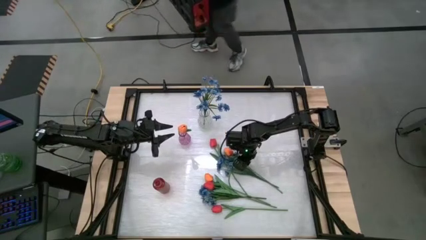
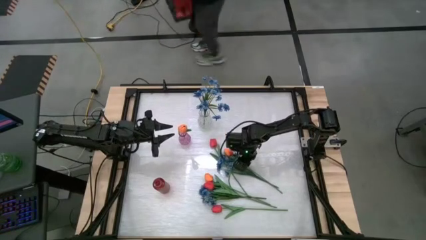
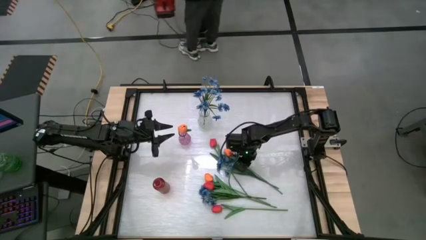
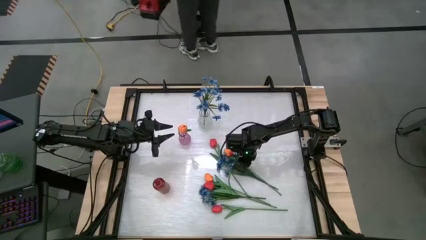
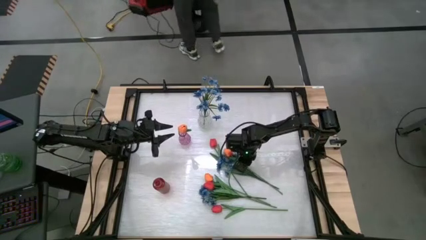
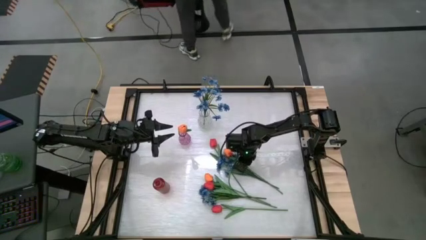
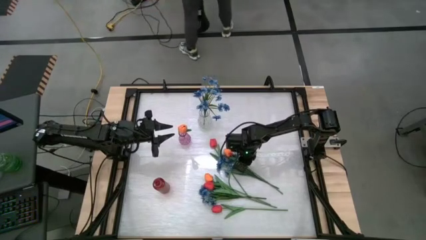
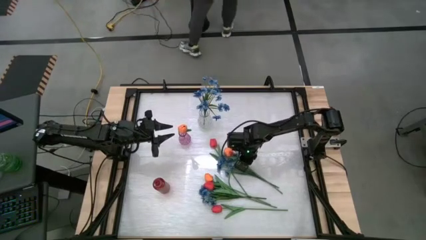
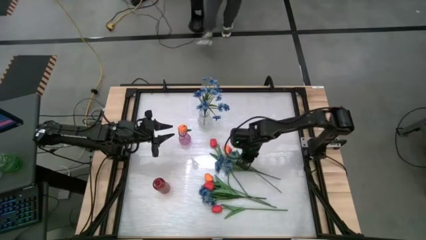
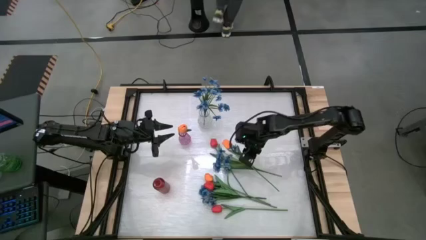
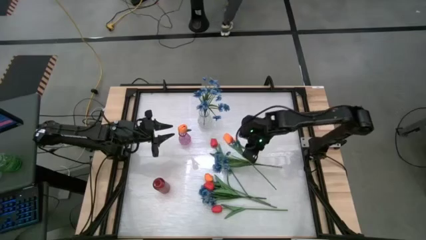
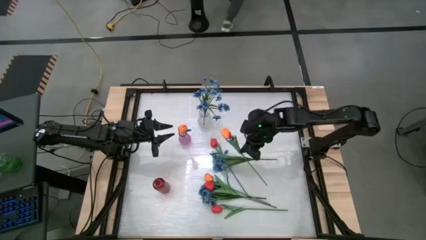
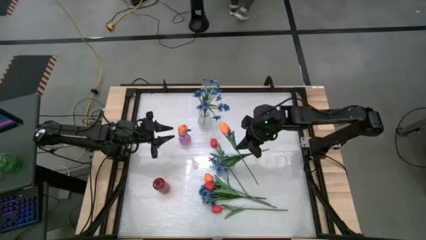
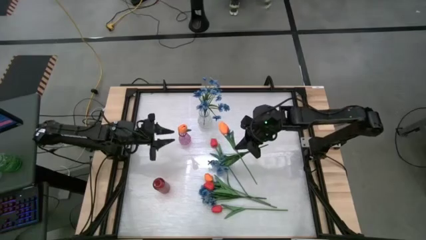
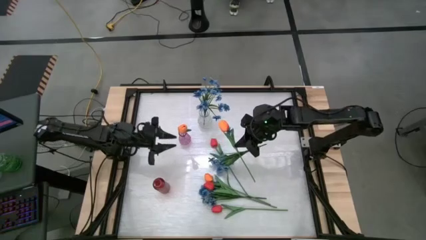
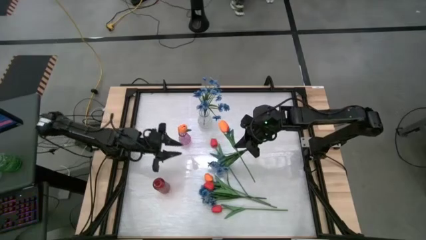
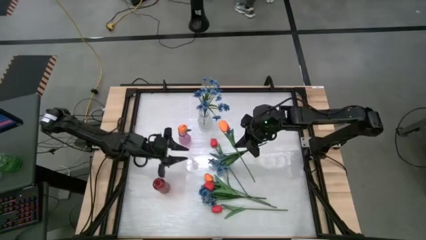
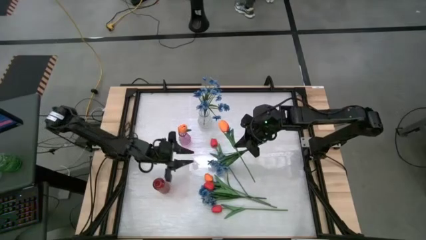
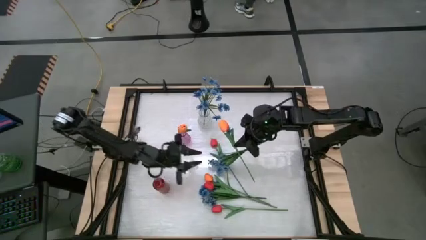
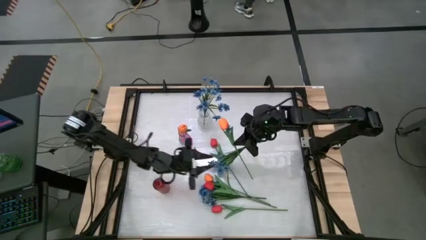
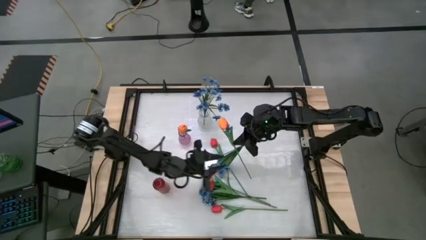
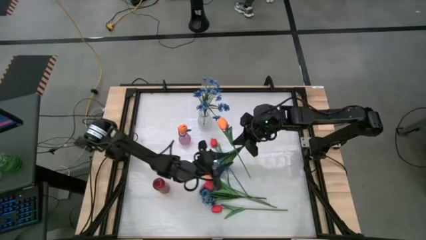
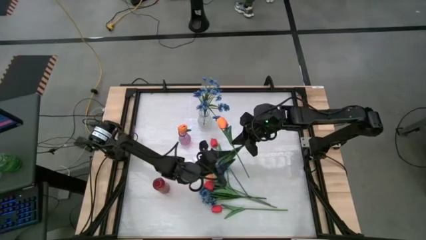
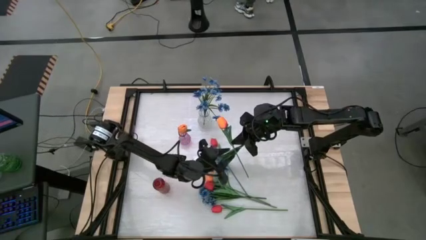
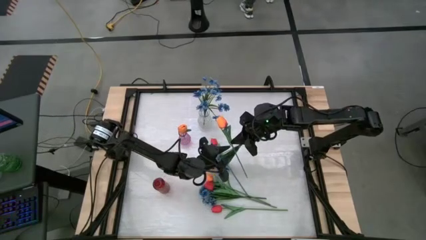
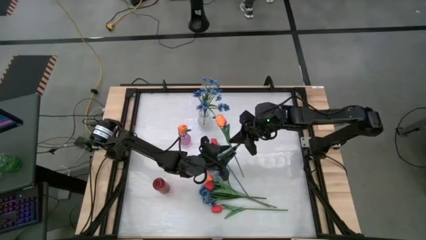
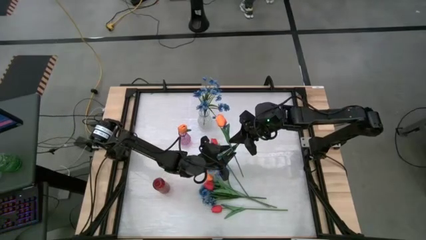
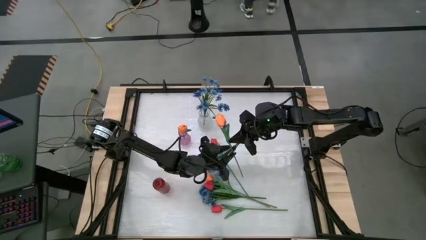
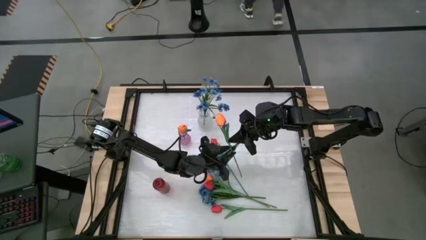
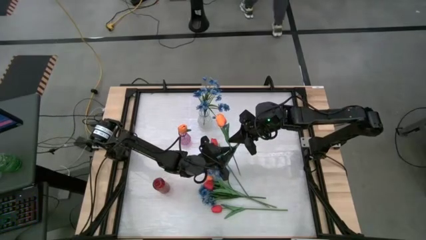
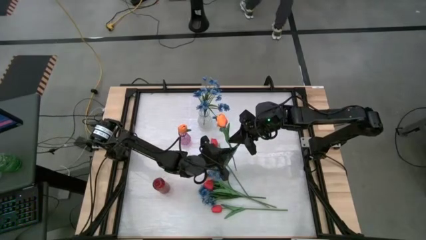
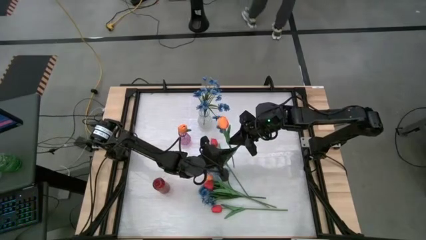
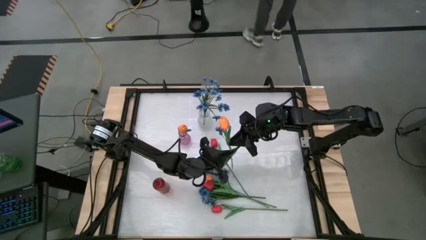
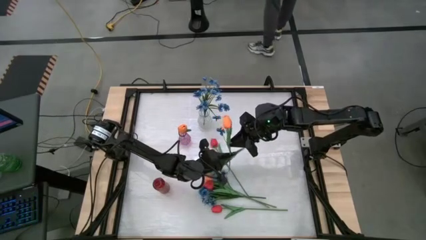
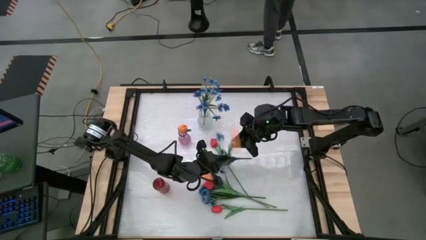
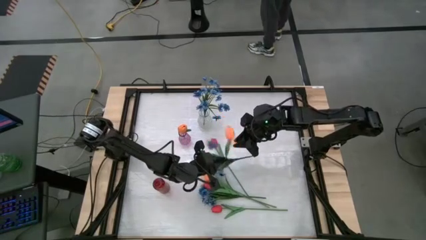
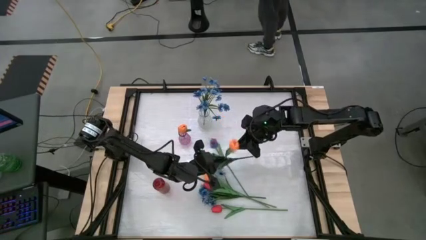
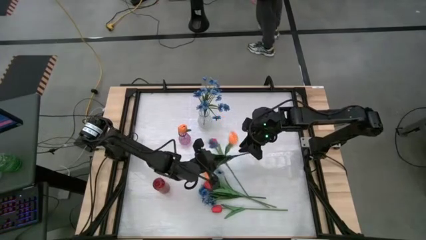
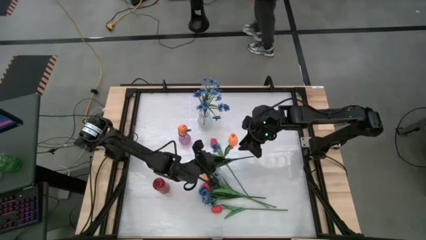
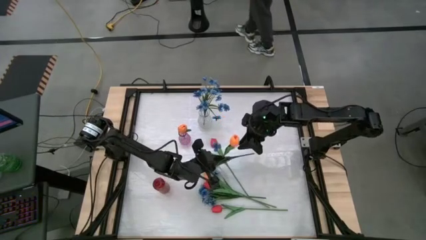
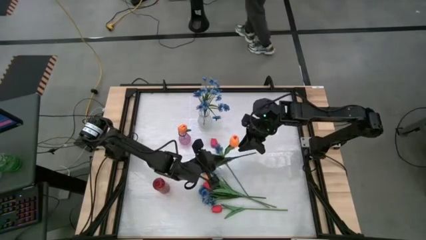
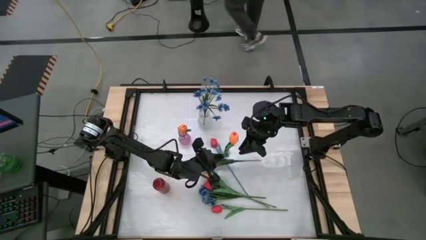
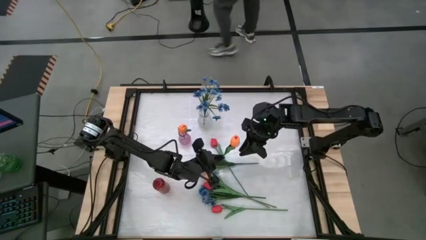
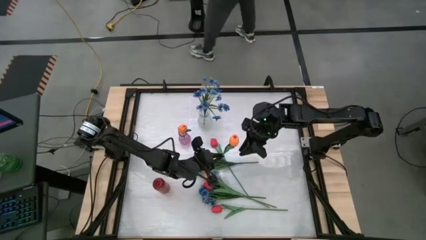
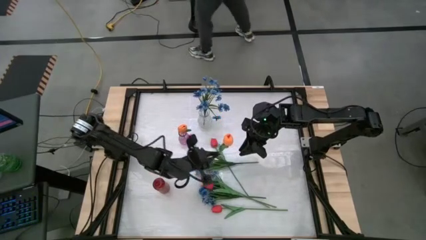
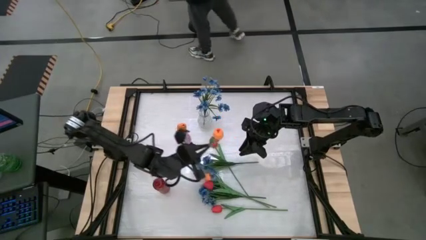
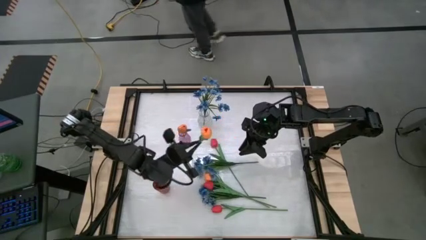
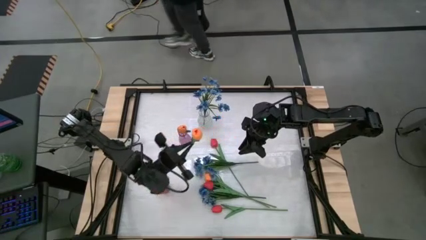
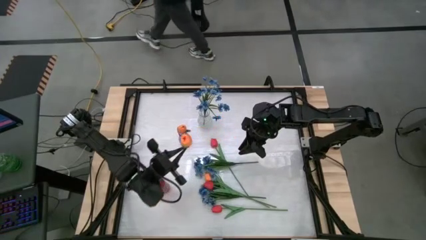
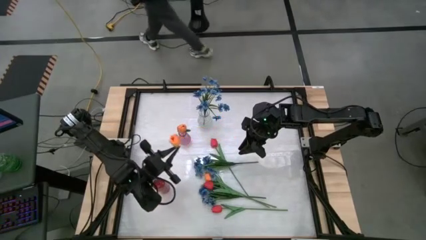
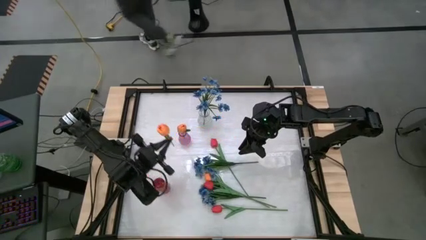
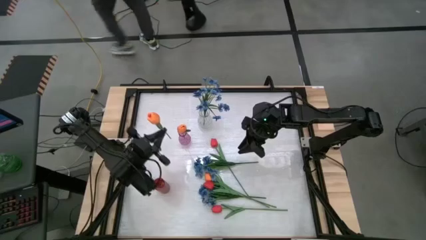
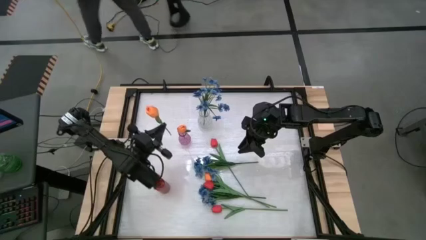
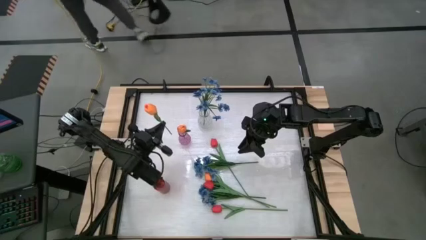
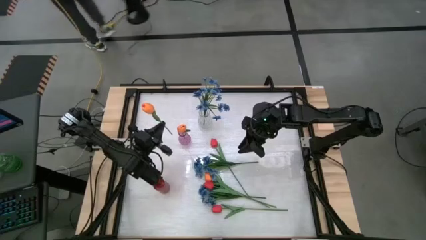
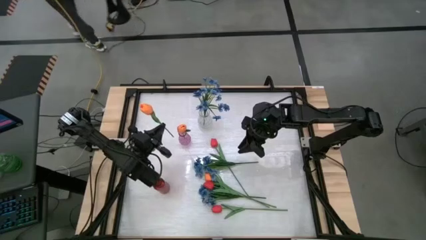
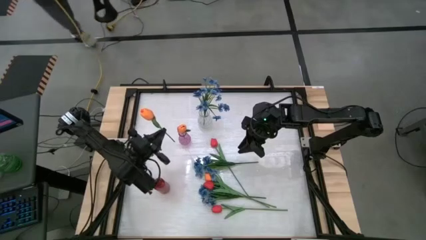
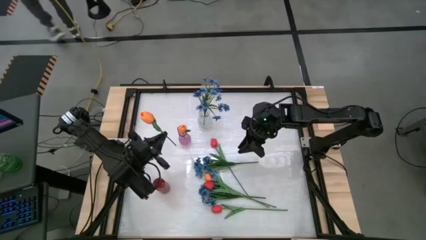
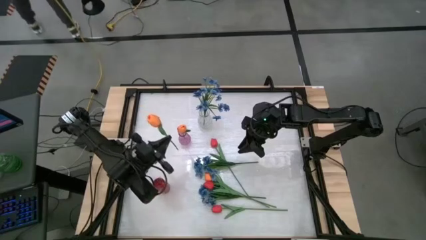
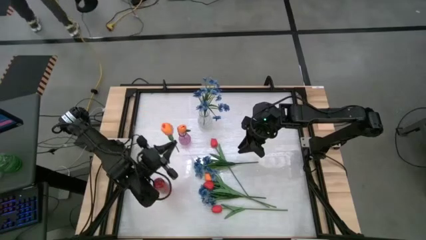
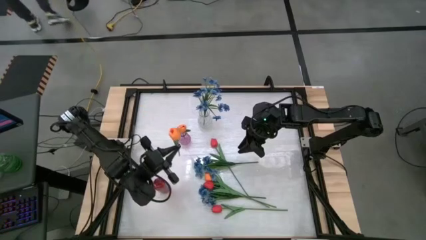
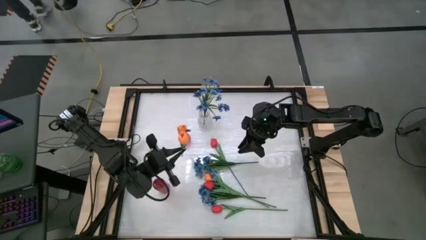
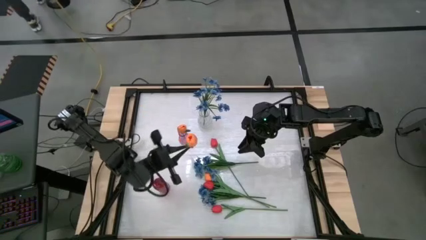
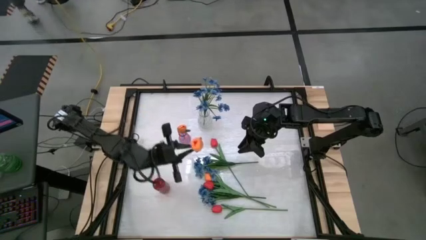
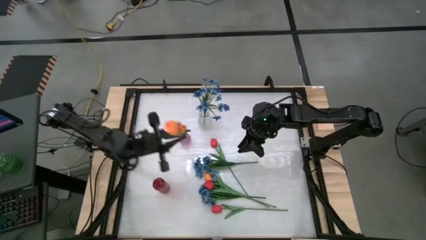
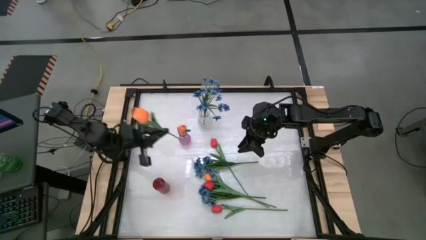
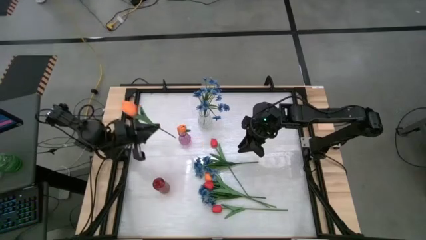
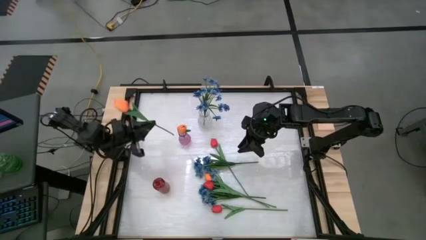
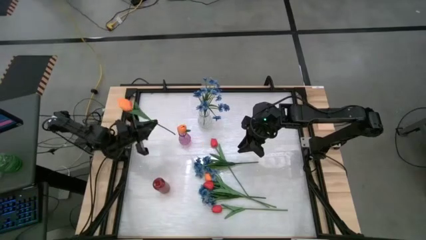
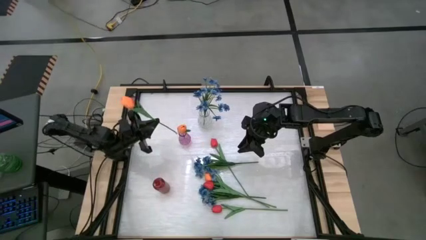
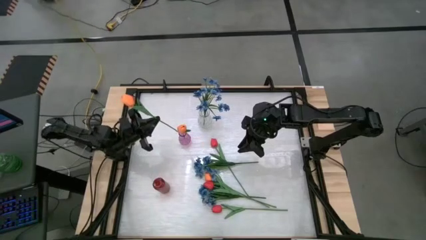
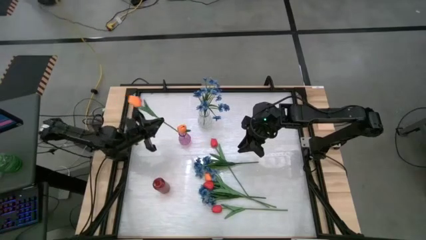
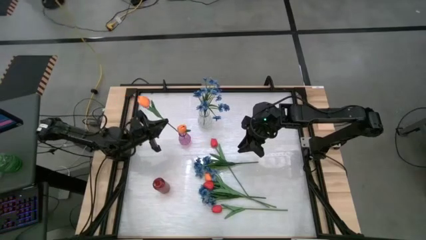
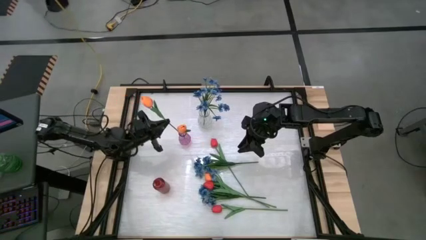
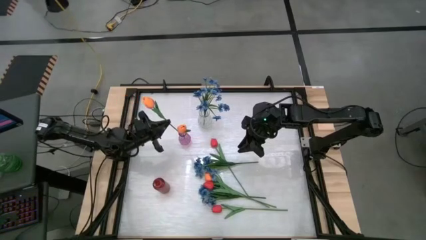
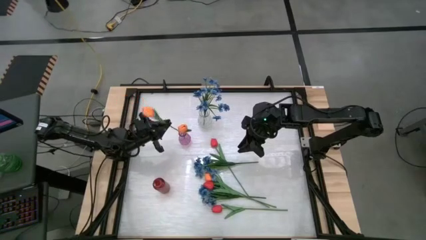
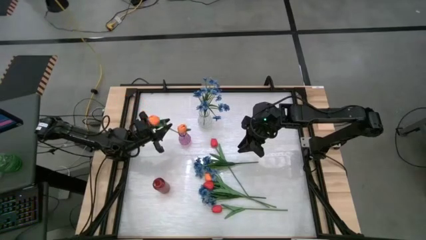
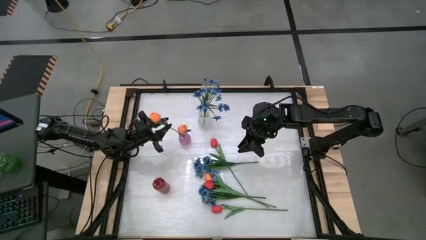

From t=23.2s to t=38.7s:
Task: Sort flowers into vase by color
Put the top orange tulip into the purple vase
